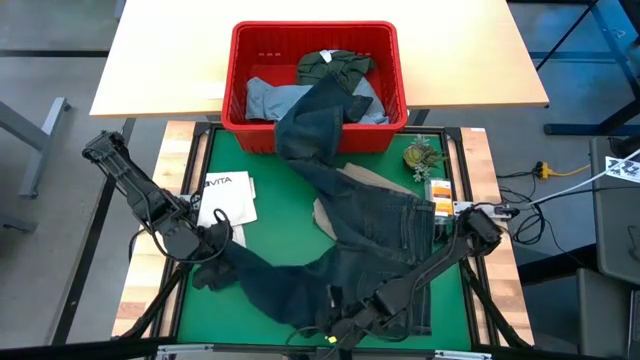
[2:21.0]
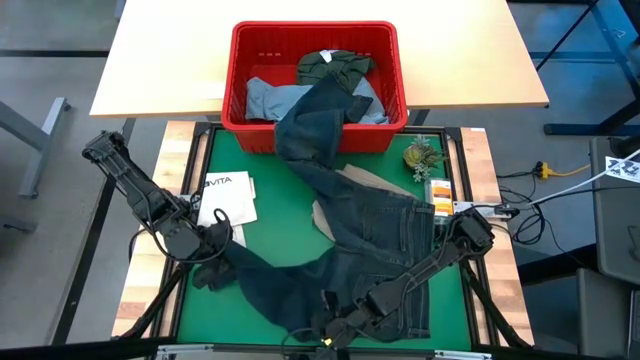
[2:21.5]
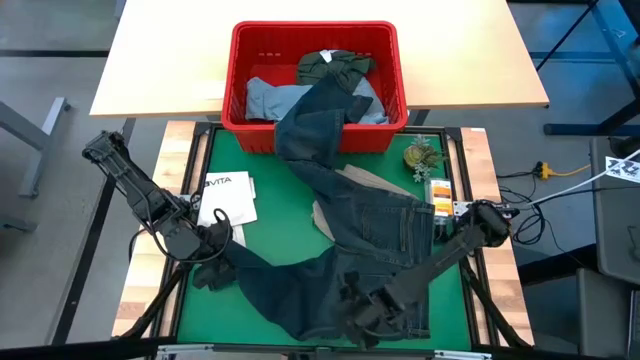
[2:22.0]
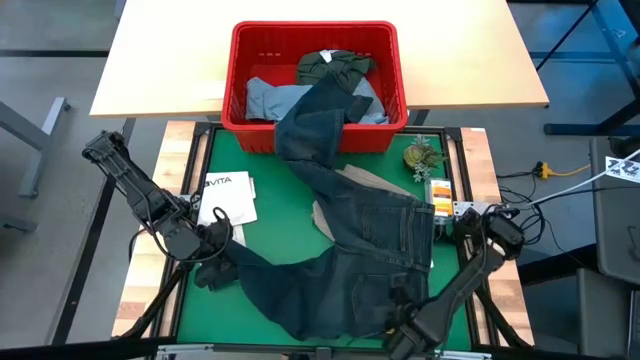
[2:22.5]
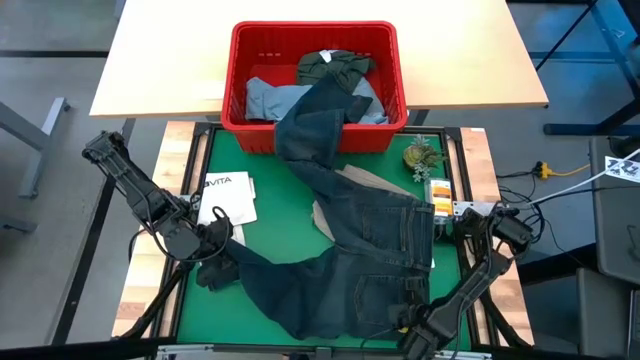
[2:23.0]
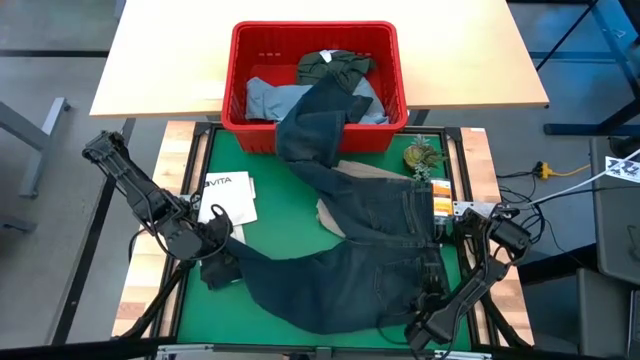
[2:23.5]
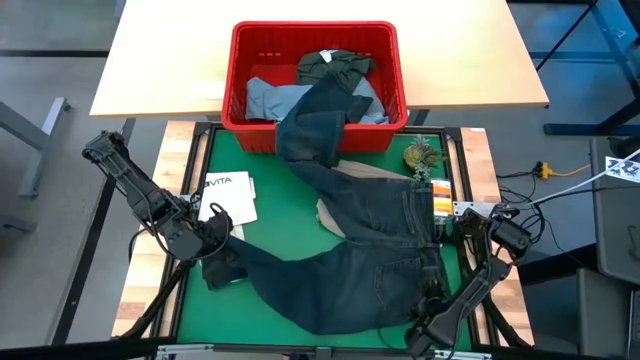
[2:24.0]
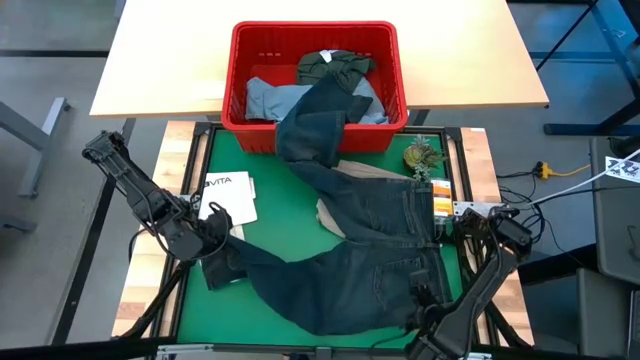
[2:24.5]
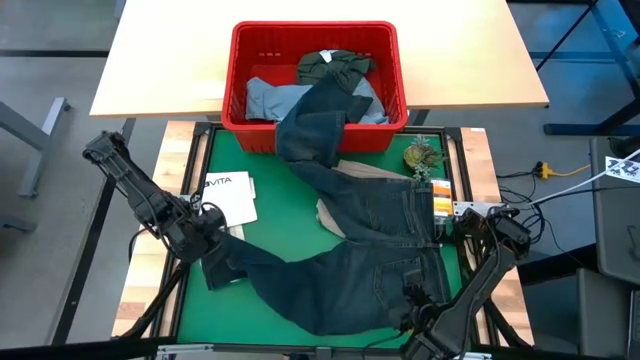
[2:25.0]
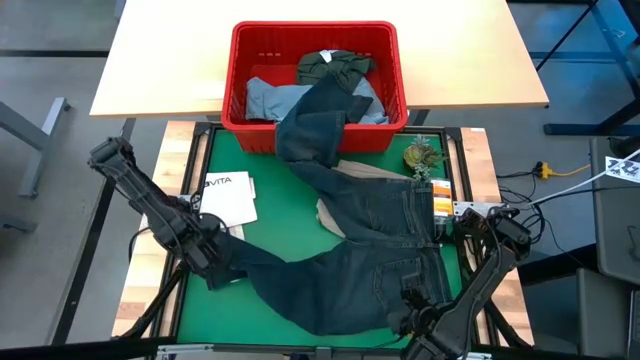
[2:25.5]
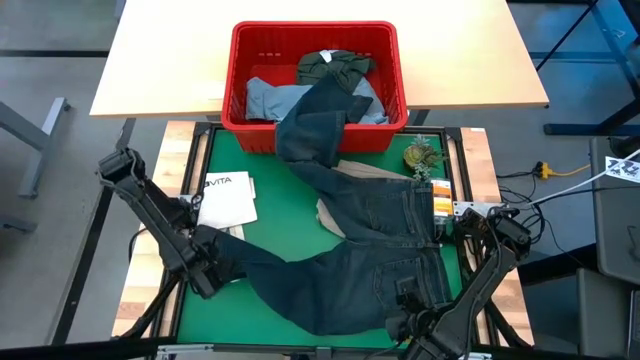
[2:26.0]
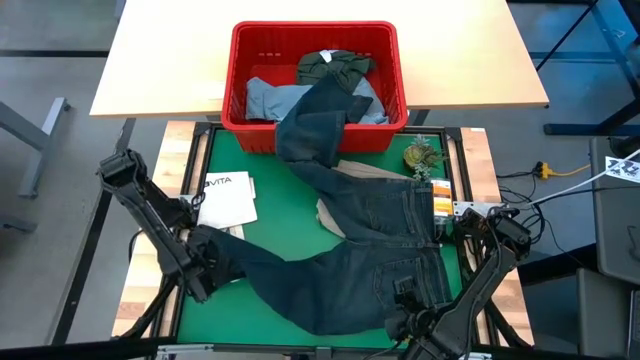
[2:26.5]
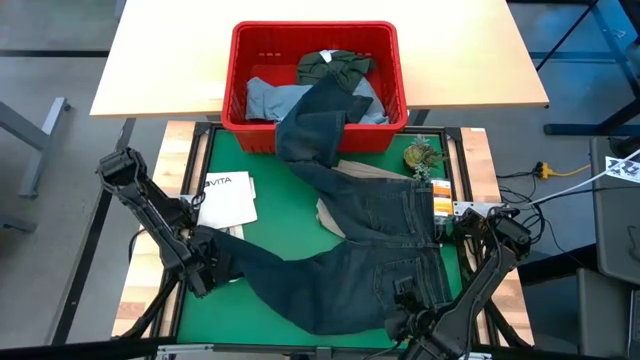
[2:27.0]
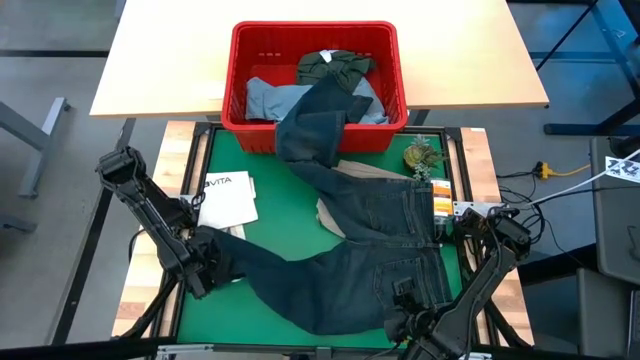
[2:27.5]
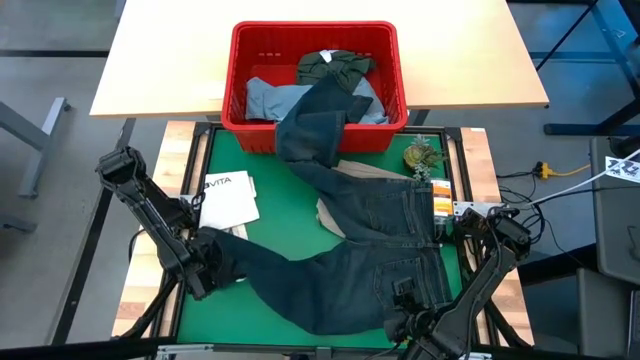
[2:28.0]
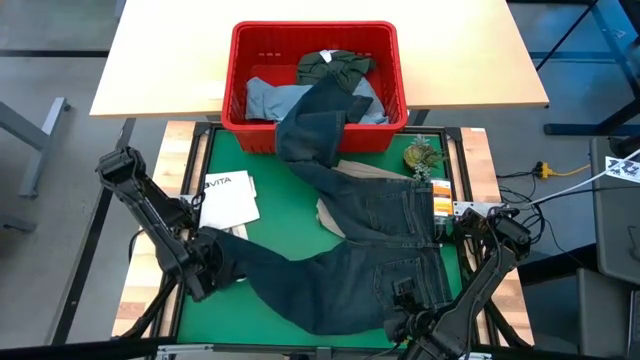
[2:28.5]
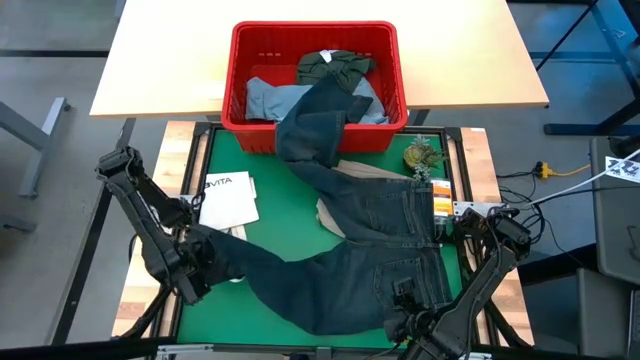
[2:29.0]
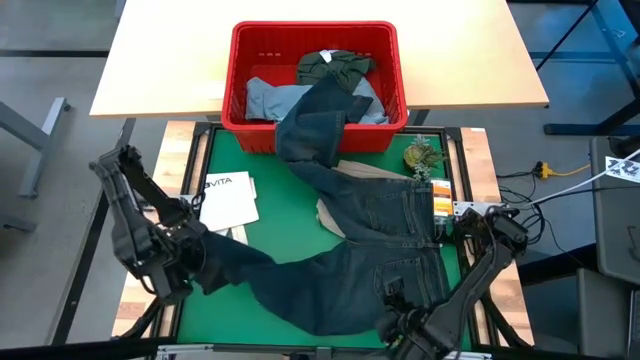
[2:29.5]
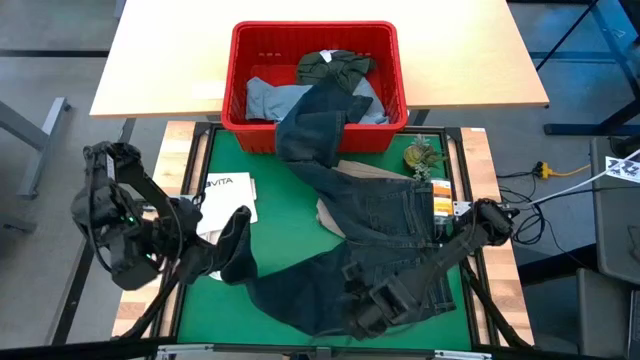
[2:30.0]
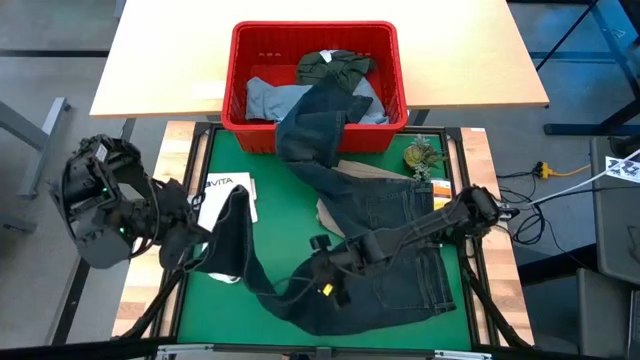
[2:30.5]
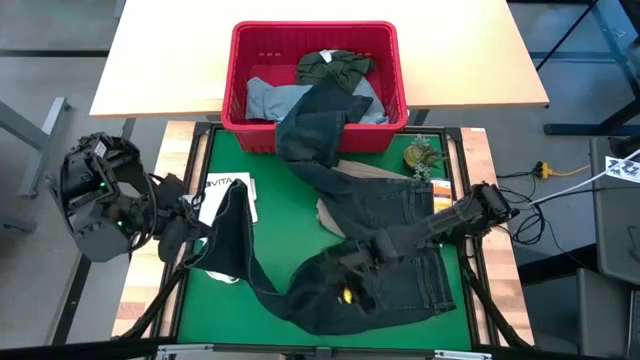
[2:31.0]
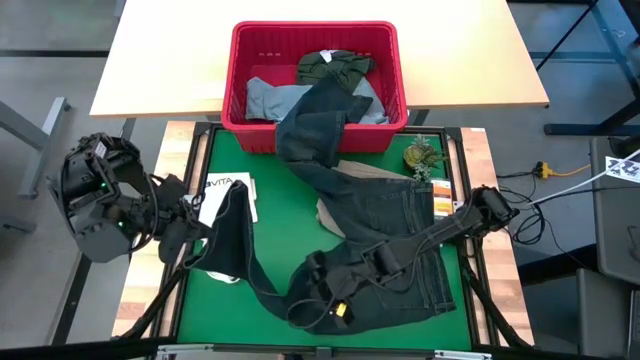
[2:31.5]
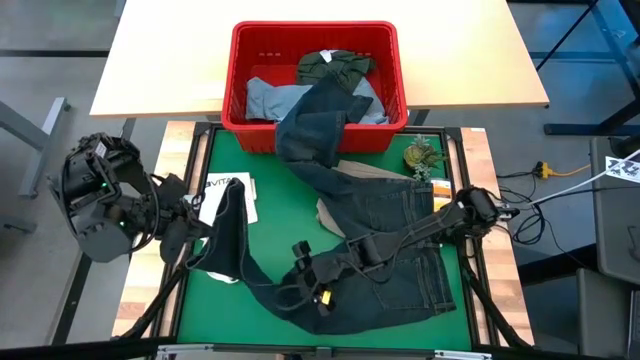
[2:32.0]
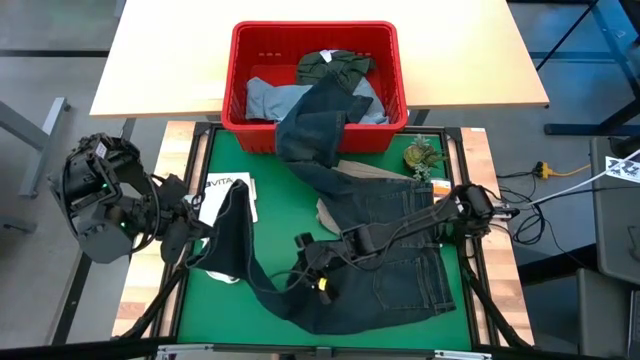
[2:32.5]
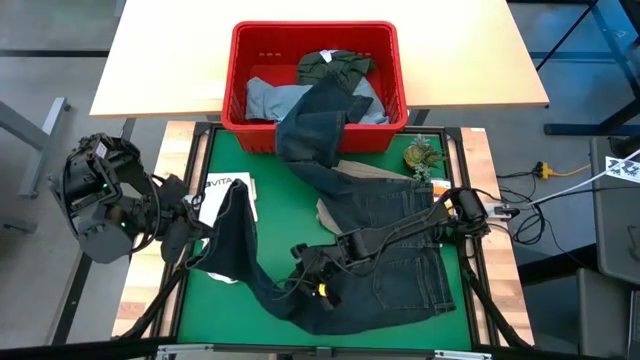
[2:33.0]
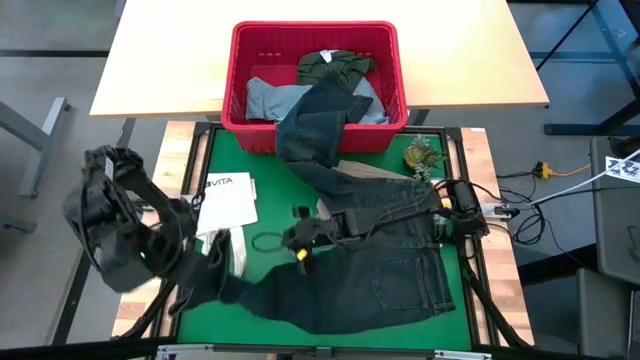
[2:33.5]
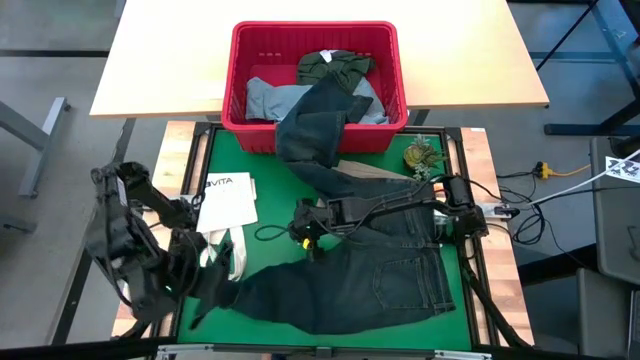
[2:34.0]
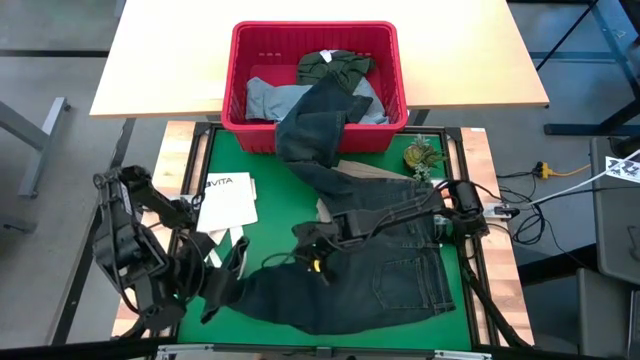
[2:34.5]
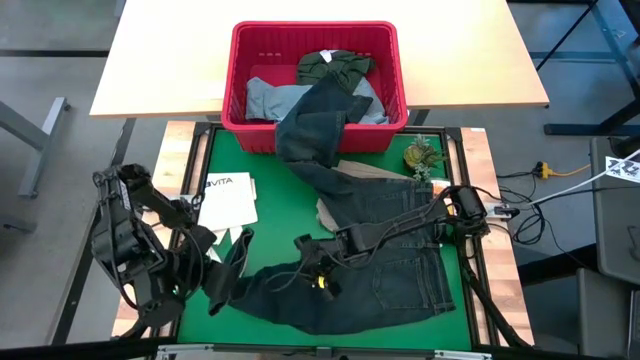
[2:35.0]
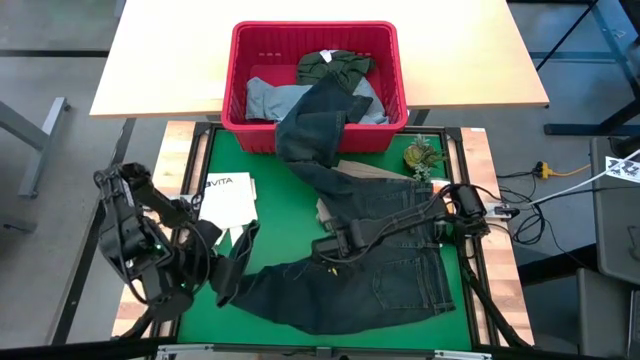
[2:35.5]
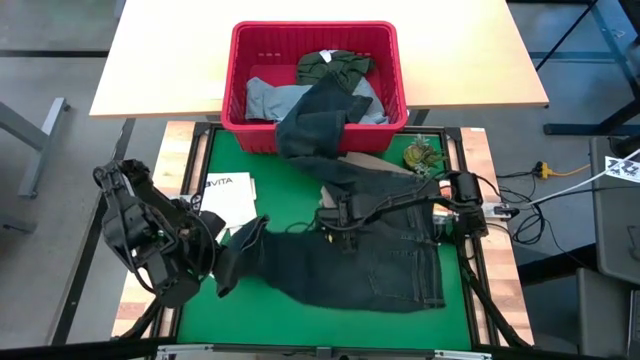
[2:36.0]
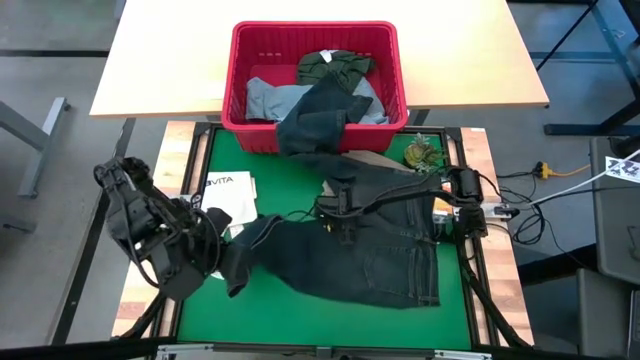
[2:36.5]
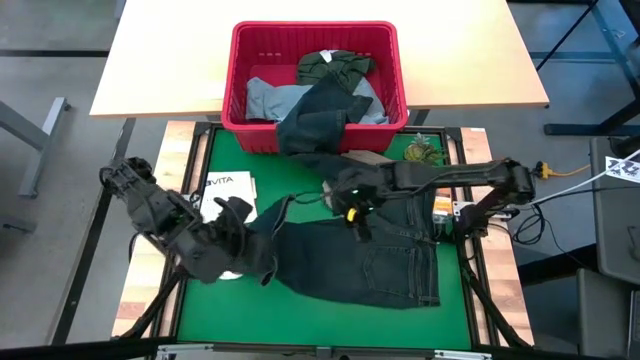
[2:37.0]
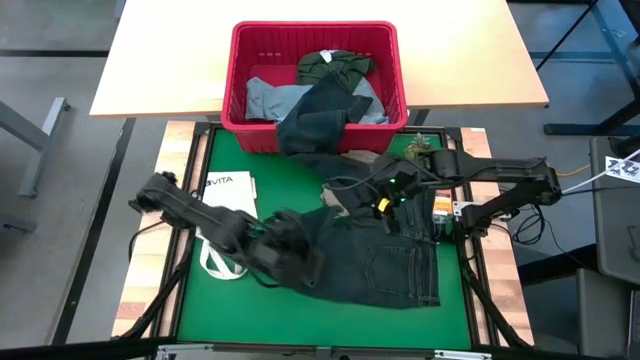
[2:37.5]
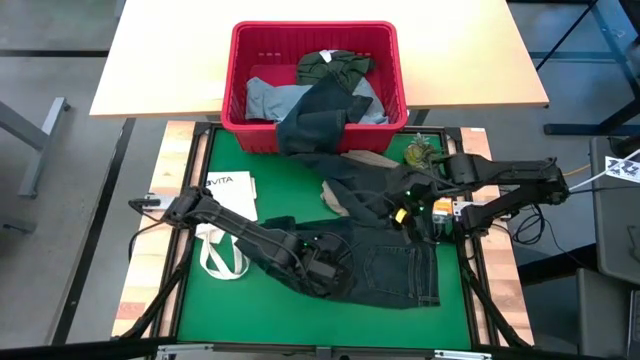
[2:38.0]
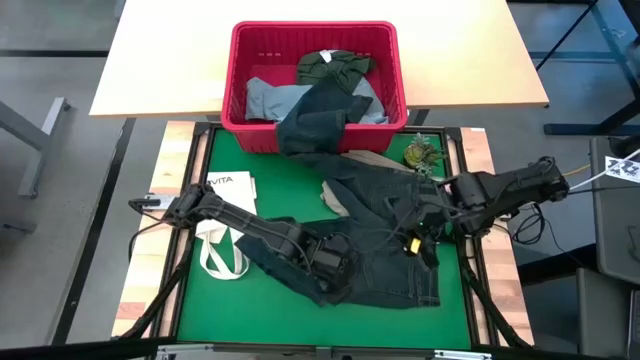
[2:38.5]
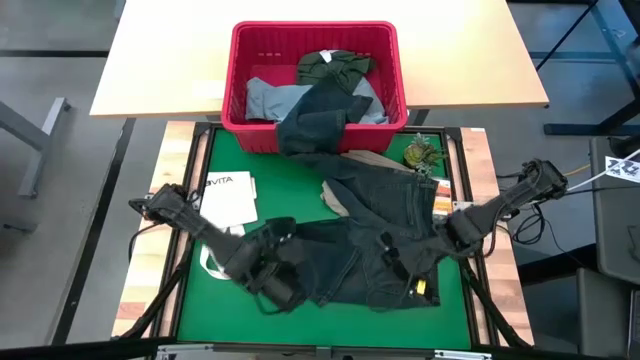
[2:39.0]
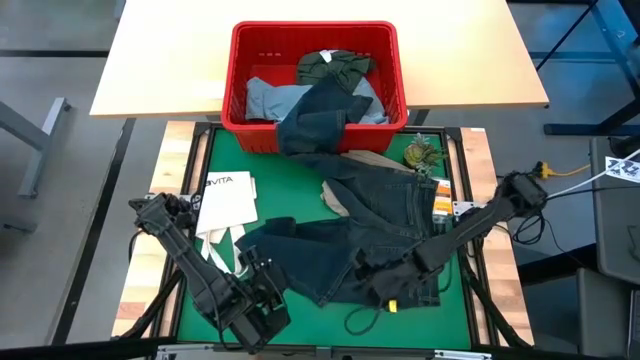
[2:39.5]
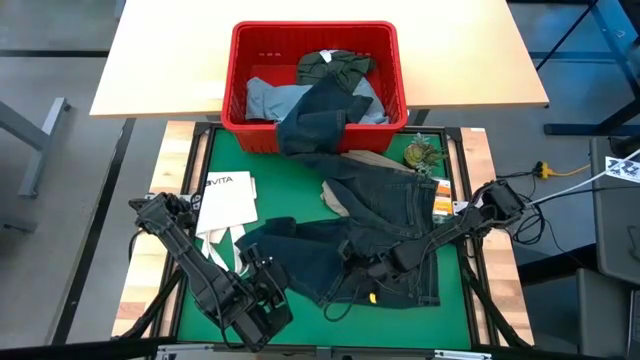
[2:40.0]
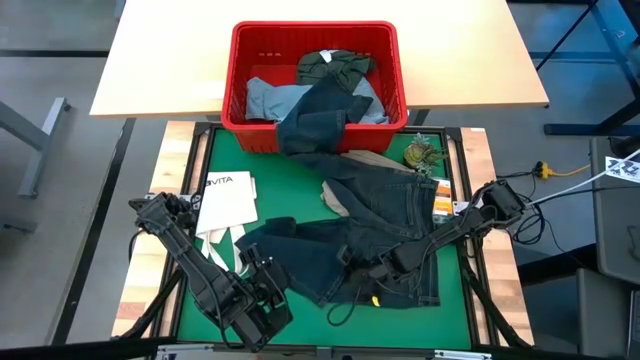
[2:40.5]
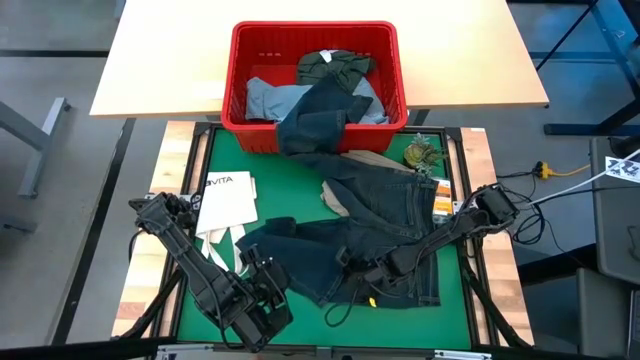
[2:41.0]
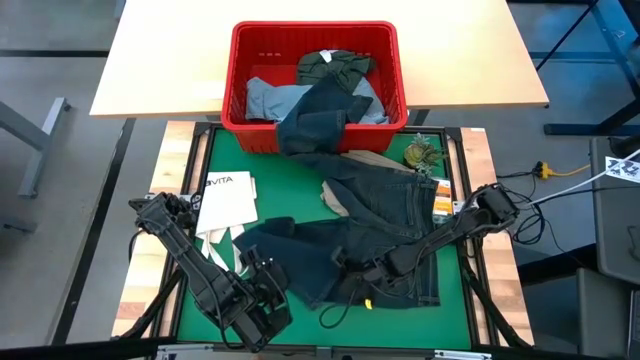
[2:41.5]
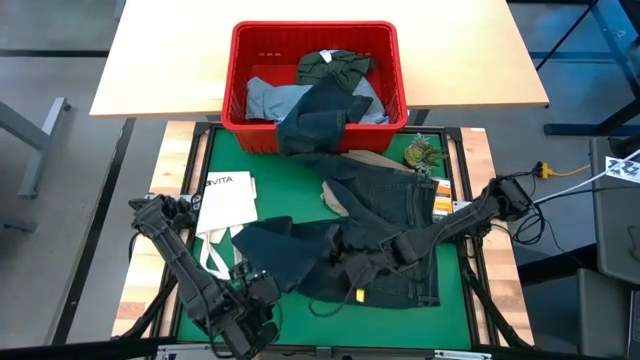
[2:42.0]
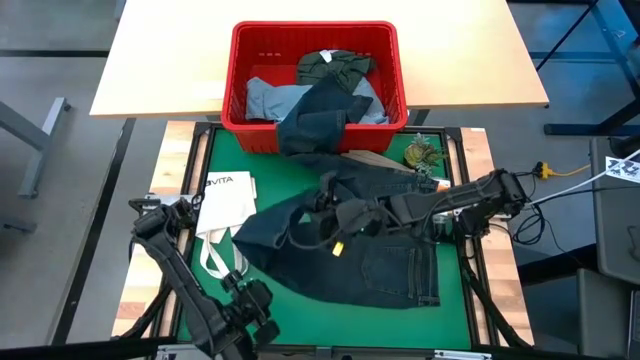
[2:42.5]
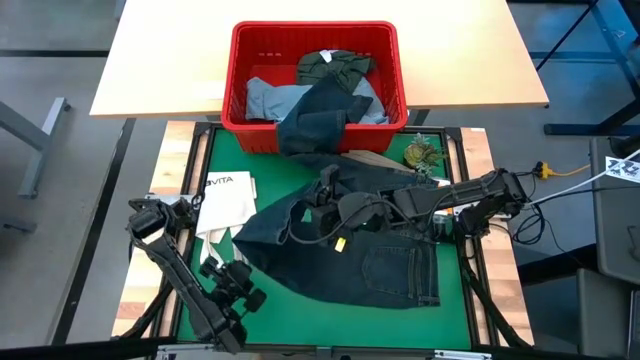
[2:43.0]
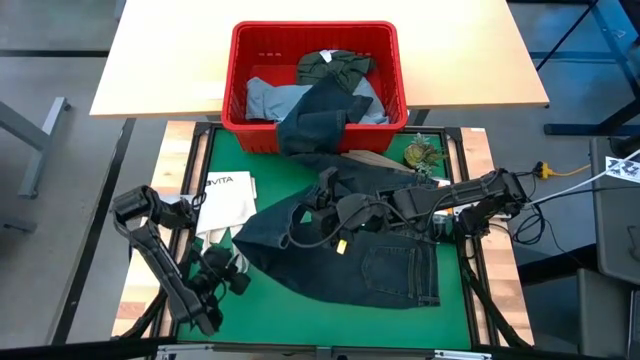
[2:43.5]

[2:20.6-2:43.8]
Task: Fold Laundry from Bin
Fold the dark blue jeans
